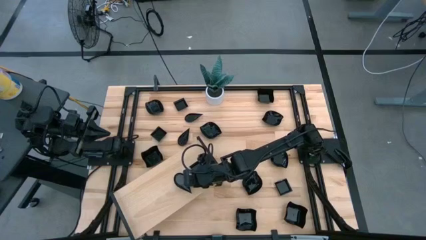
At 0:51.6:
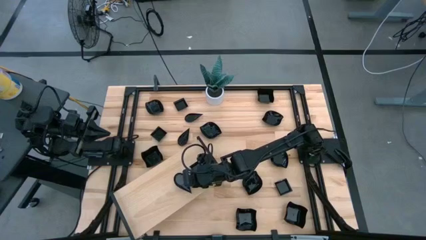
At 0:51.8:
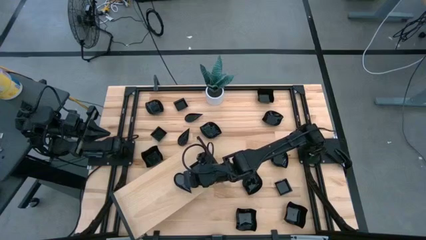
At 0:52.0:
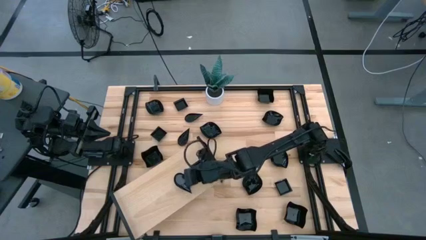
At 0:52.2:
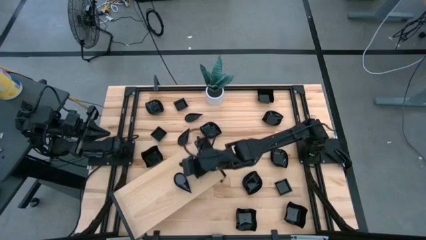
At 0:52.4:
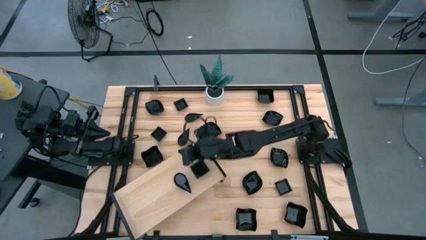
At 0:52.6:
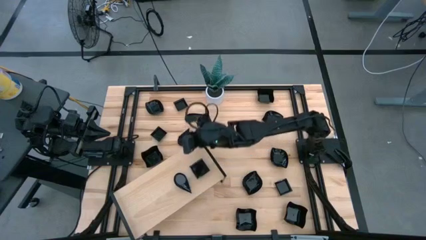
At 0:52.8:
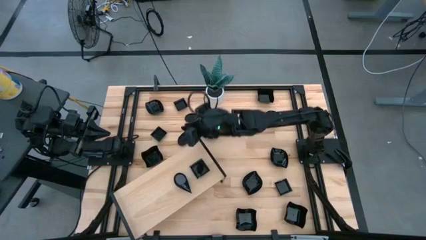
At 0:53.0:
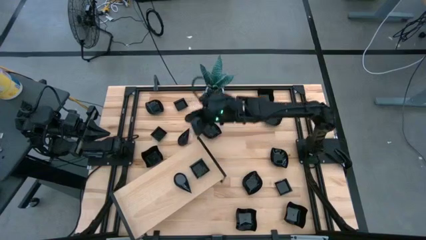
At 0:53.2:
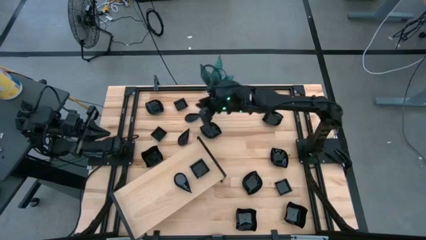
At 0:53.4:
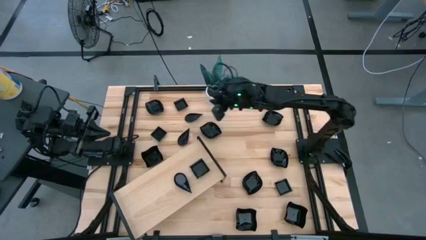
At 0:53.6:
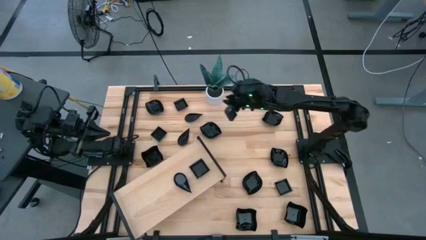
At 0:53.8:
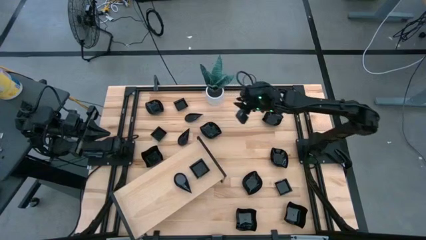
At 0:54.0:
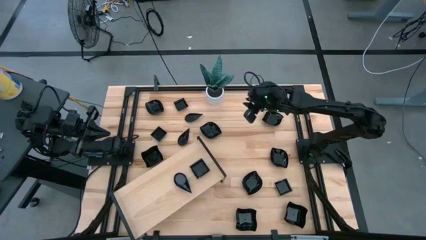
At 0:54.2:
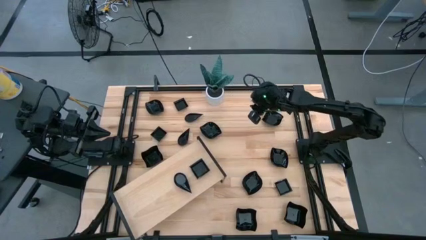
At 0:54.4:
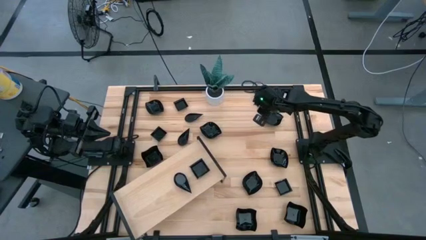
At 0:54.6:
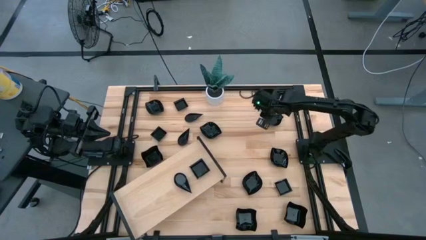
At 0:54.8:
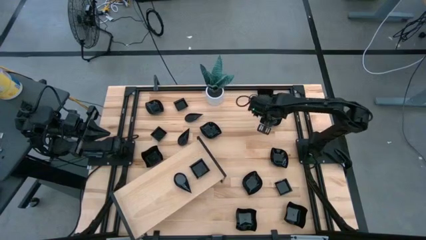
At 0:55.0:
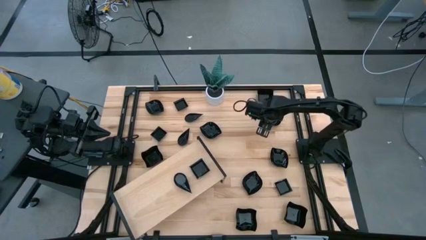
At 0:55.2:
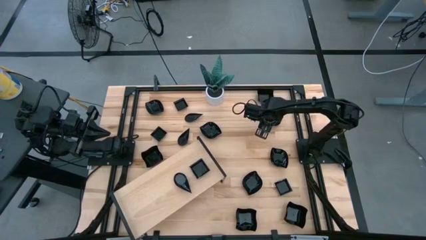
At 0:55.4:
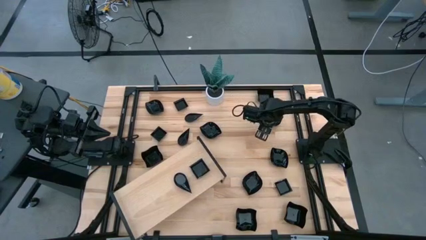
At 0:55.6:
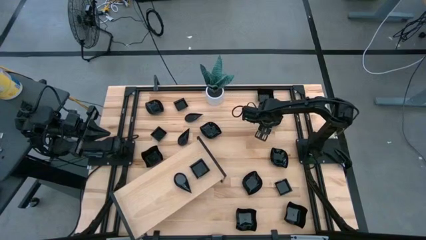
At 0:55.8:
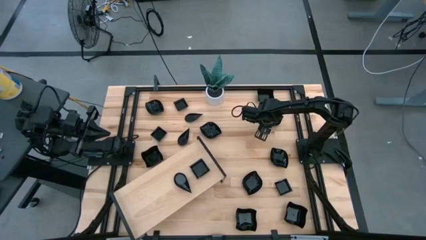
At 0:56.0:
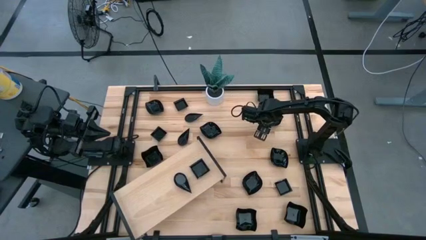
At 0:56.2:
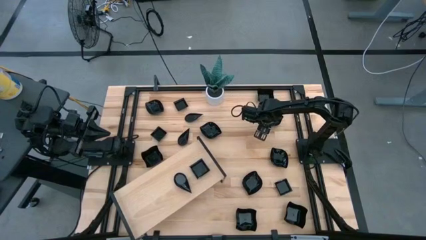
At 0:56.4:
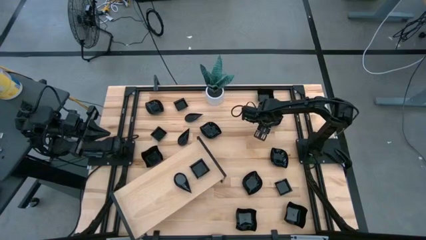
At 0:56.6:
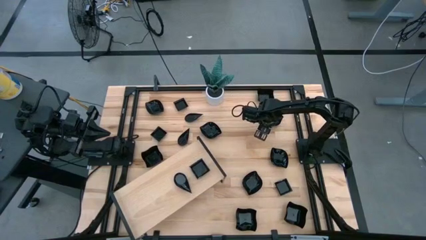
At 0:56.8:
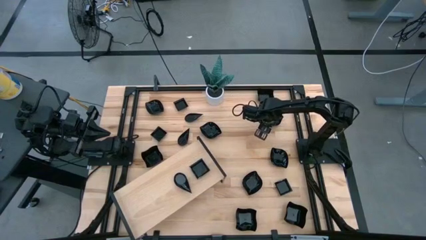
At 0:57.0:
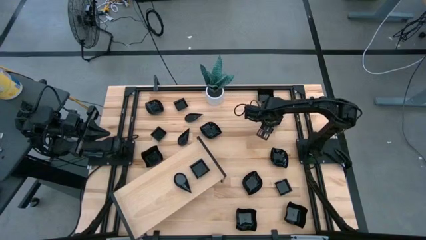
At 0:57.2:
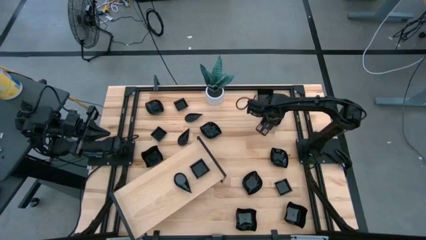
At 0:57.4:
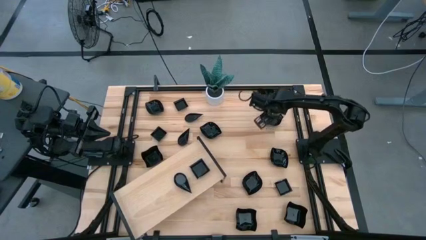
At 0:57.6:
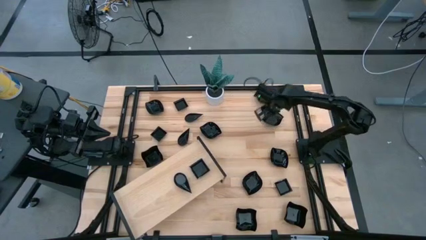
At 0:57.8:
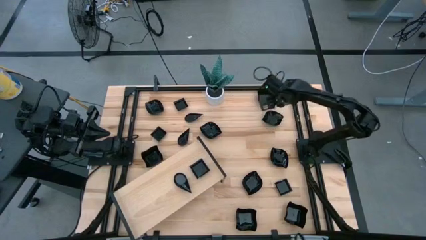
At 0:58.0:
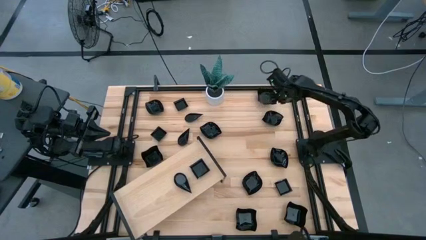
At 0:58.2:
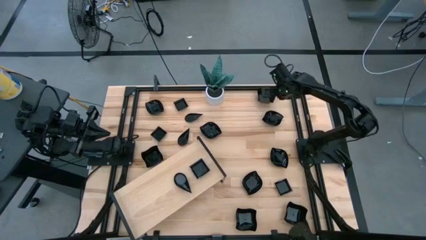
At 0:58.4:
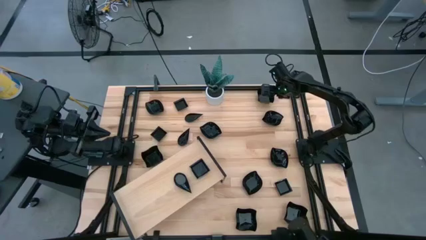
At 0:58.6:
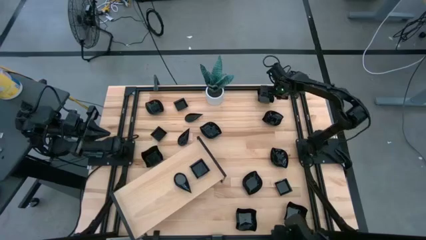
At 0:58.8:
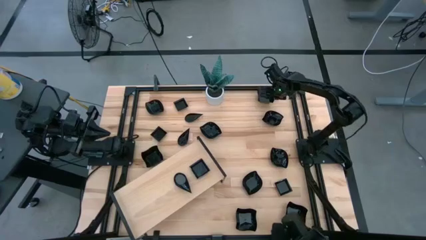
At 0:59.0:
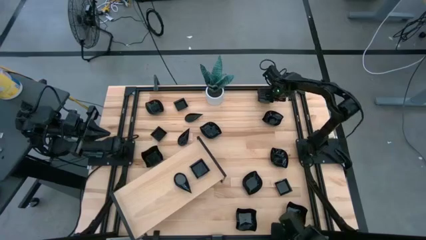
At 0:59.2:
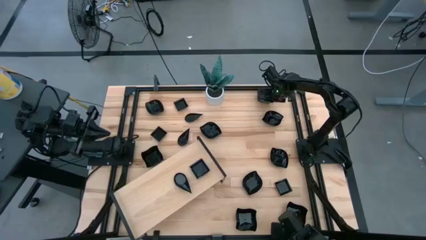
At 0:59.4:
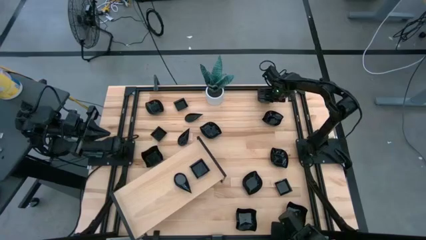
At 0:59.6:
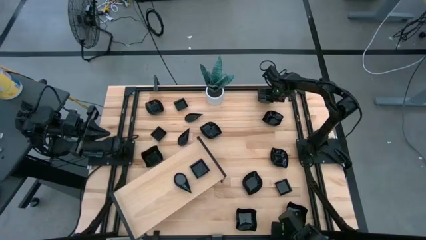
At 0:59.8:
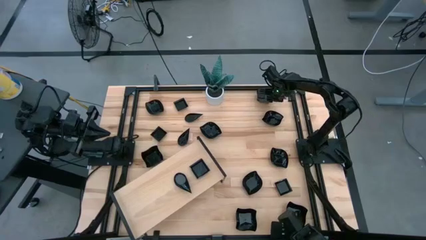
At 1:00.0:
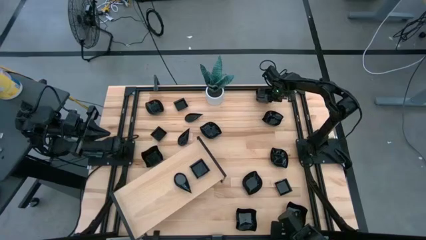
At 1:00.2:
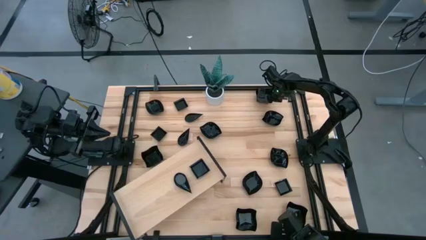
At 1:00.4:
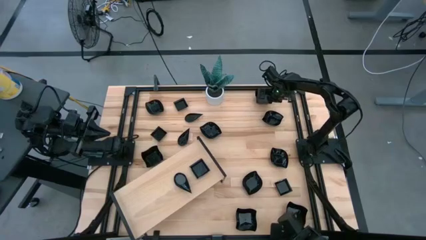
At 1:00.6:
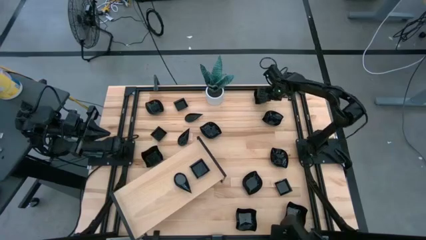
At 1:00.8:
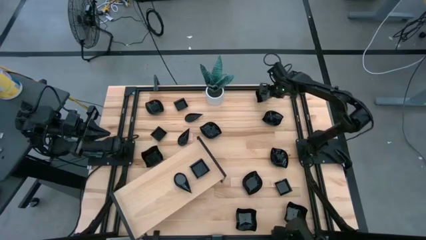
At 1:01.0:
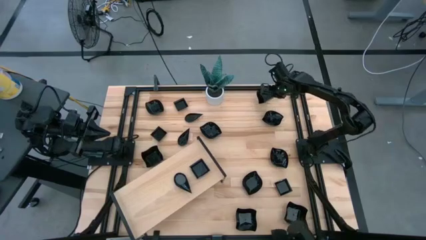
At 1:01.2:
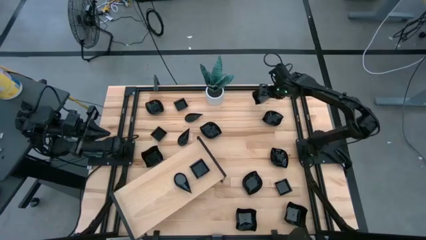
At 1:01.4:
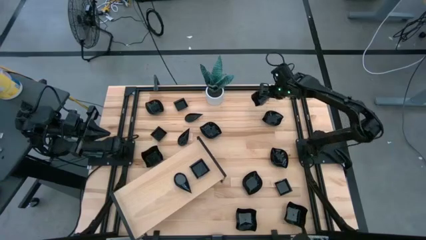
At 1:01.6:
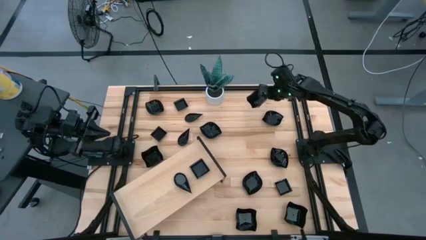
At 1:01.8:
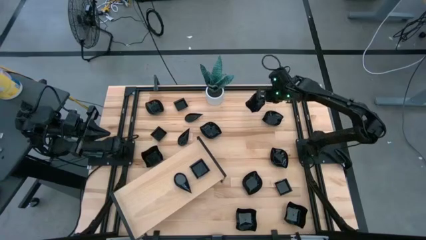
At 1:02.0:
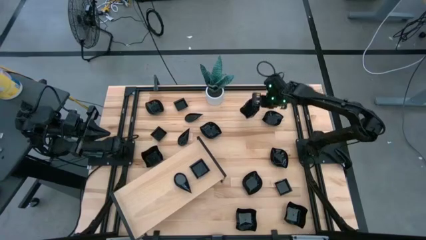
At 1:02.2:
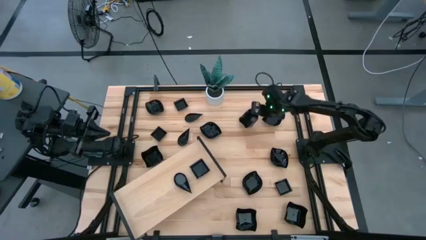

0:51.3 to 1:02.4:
Task: Pick & Place Mini shaped plates
Put the black distorted square plate on the shelf

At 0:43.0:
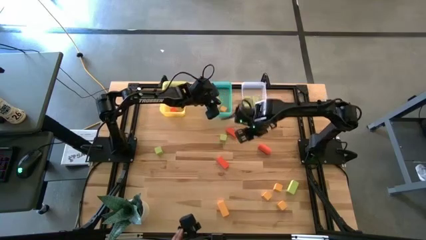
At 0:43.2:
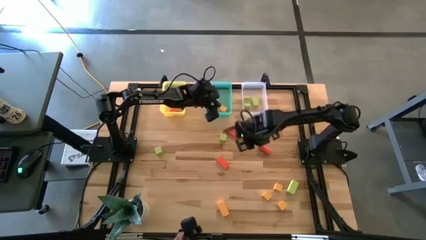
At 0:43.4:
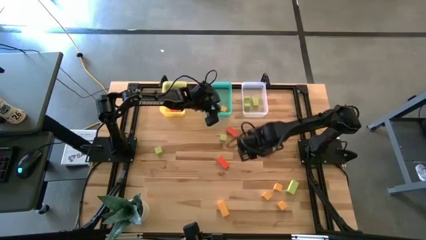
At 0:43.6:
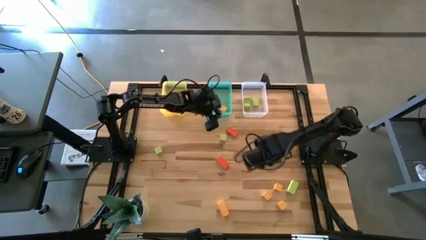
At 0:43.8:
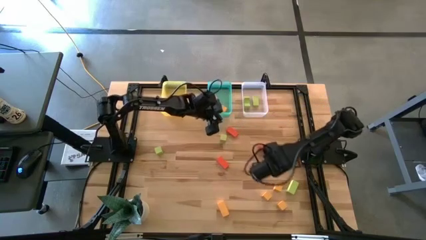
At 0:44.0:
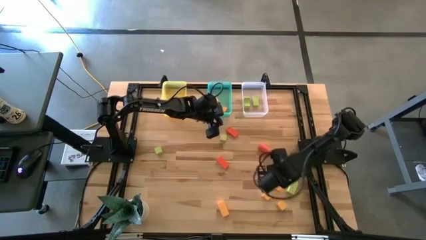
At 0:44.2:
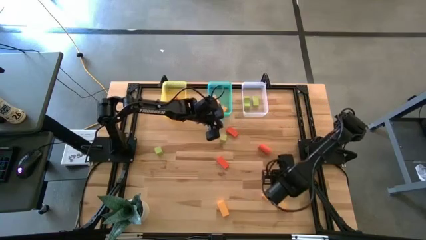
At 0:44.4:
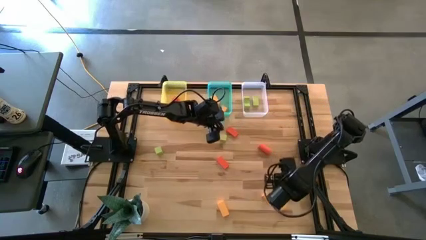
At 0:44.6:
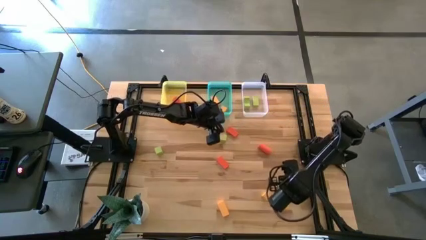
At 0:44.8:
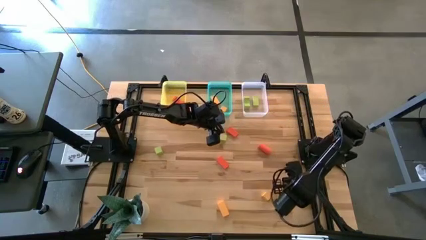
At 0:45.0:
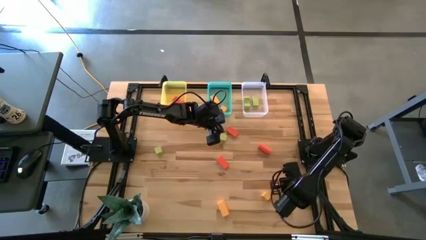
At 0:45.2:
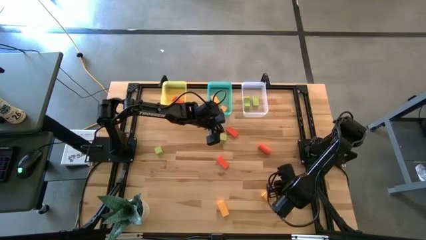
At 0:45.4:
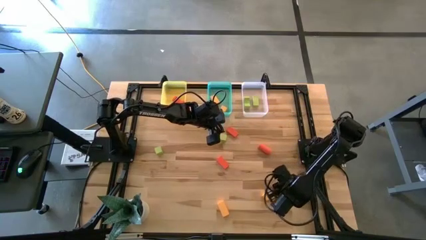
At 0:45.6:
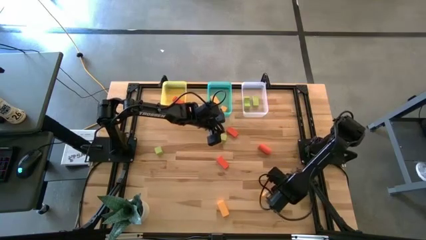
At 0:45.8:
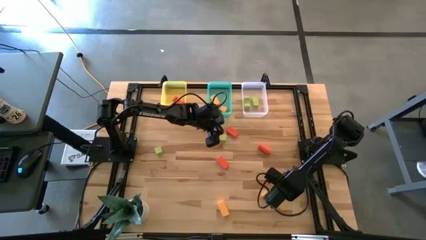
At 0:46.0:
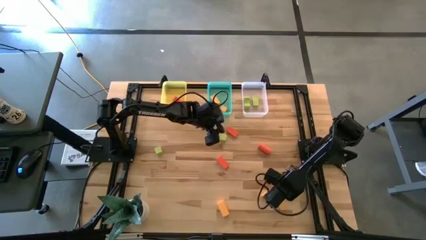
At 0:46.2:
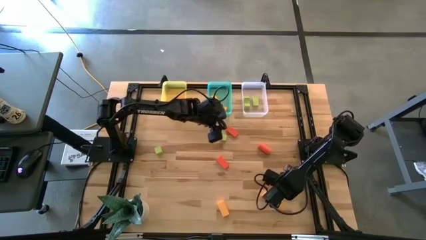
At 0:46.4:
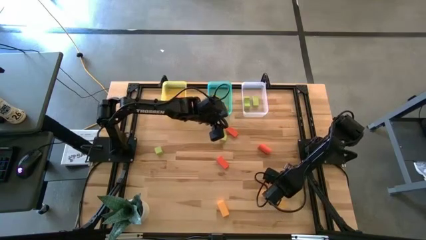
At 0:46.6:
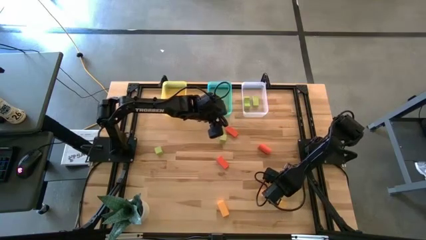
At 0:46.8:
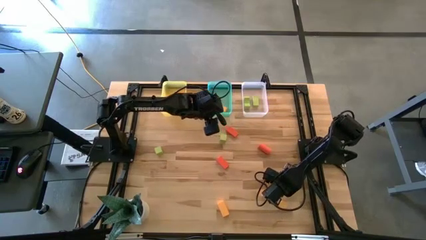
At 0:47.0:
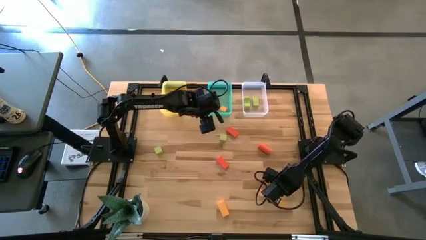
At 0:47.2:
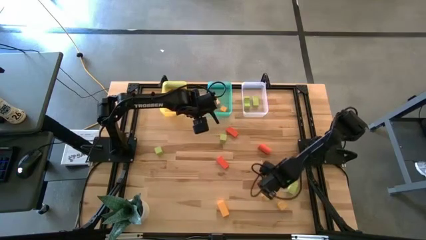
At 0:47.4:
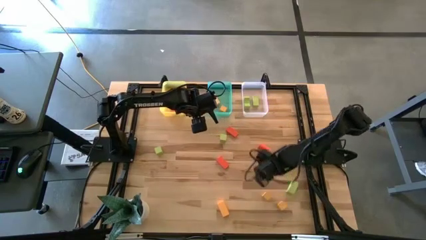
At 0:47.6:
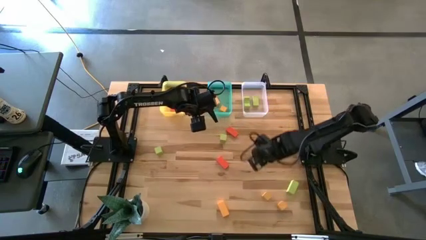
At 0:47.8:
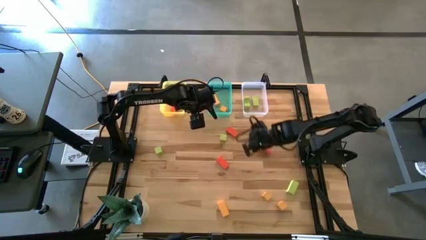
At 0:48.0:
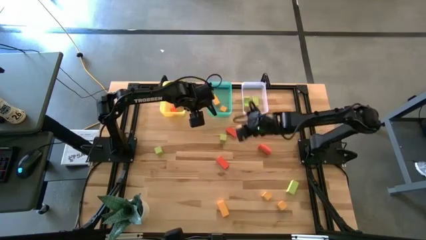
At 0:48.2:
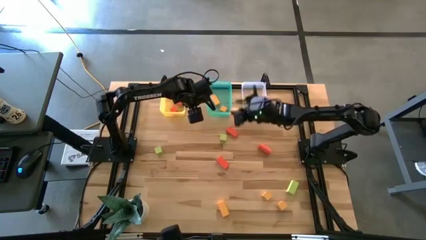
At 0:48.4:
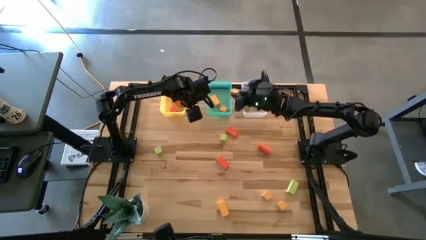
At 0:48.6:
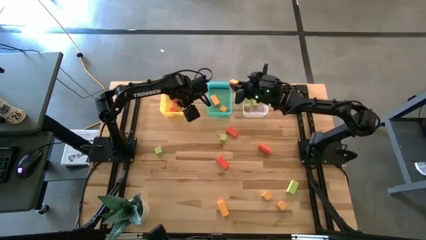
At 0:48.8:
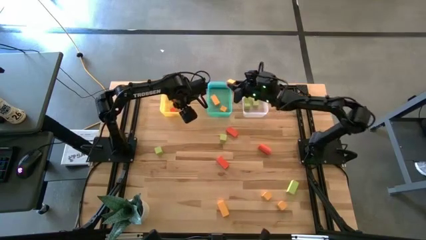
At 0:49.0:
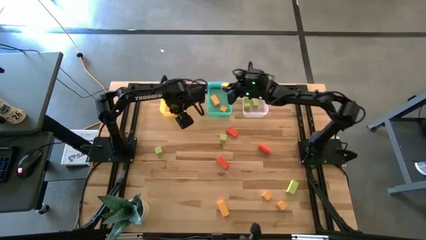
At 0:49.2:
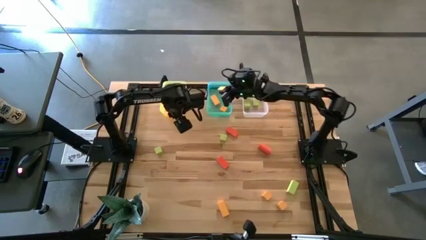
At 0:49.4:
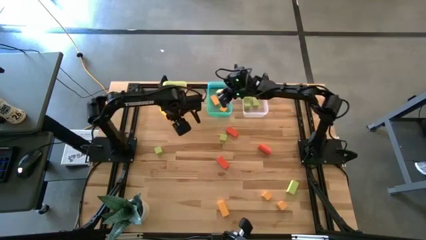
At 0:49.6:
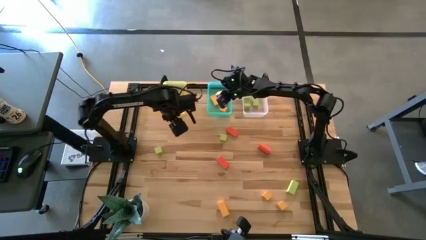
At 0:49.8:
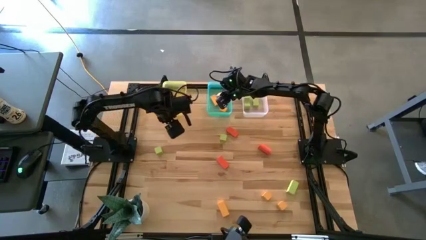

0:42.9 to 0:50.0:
Task: Sort & place blocks by color
Put the yellow block into the green bin
